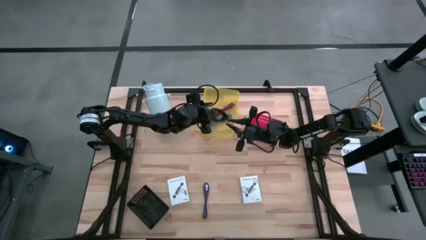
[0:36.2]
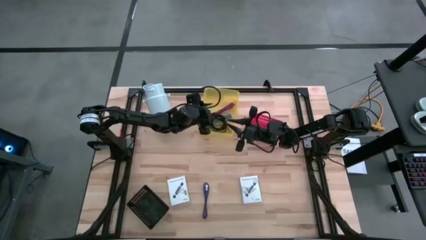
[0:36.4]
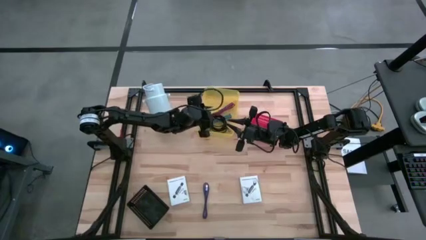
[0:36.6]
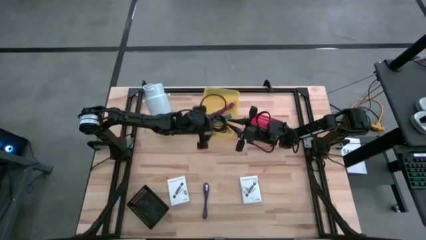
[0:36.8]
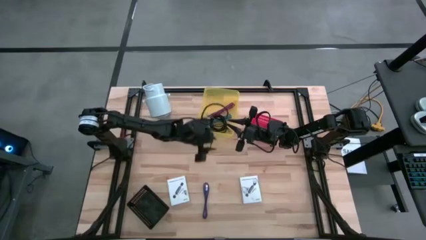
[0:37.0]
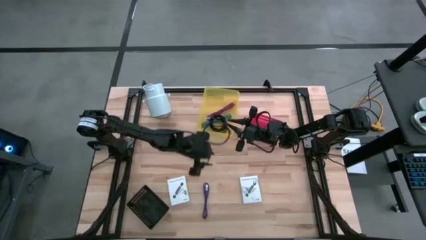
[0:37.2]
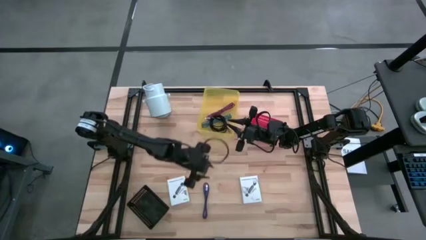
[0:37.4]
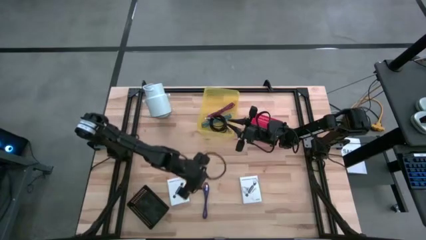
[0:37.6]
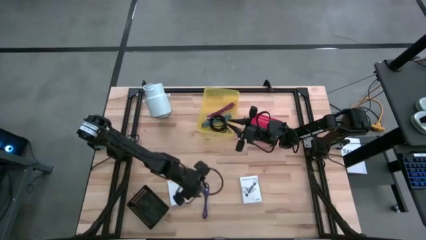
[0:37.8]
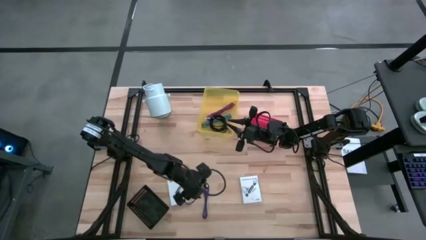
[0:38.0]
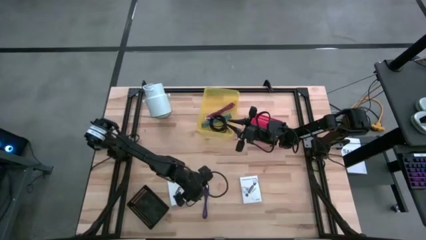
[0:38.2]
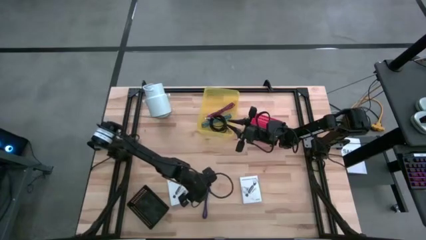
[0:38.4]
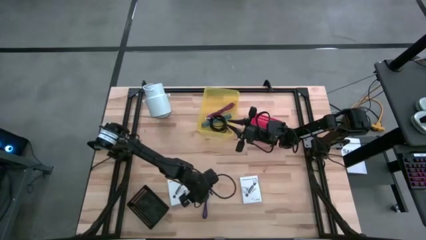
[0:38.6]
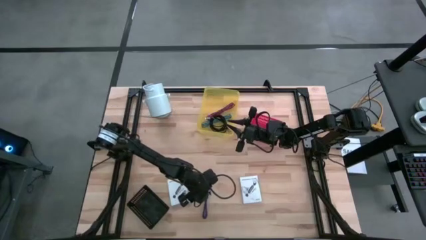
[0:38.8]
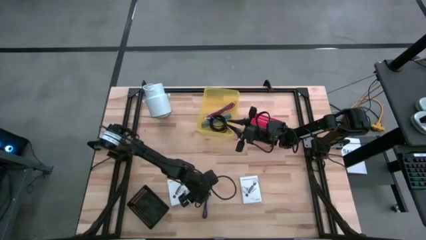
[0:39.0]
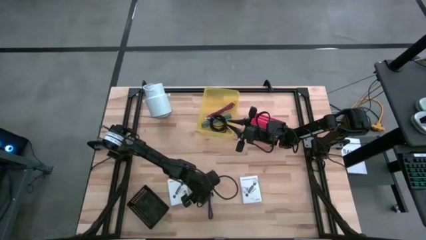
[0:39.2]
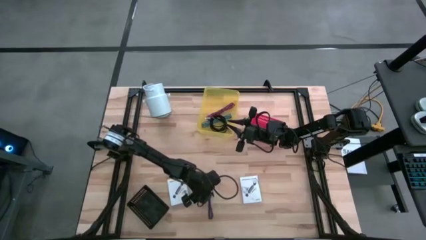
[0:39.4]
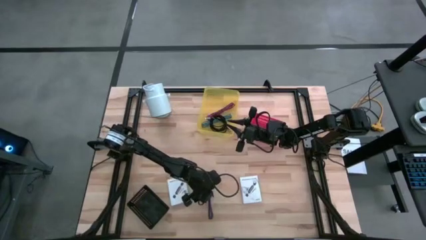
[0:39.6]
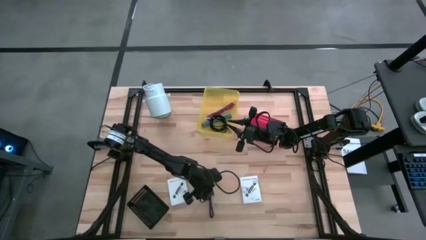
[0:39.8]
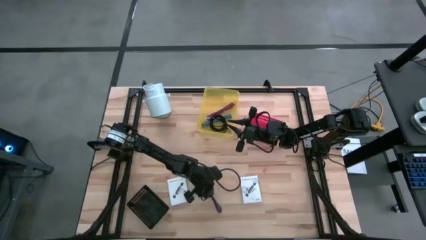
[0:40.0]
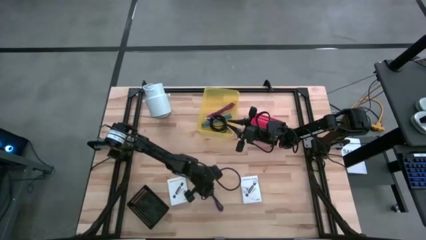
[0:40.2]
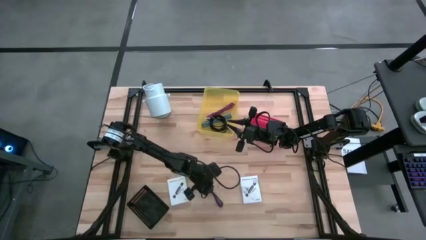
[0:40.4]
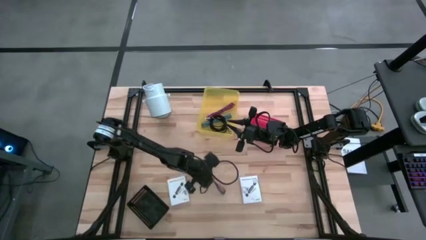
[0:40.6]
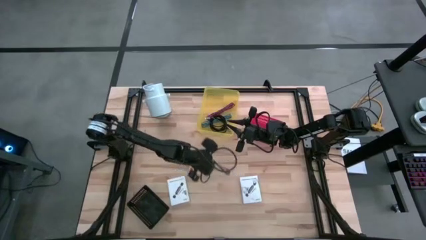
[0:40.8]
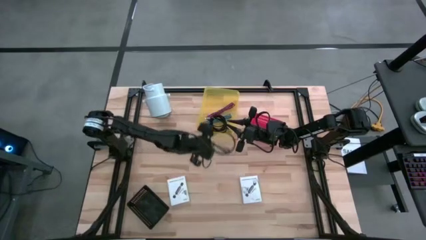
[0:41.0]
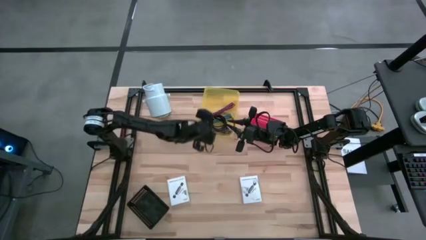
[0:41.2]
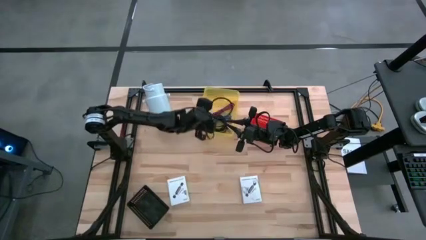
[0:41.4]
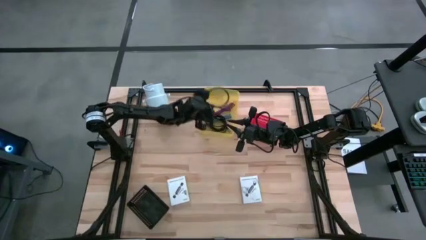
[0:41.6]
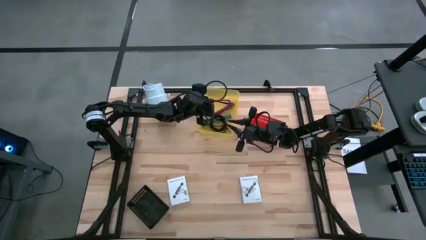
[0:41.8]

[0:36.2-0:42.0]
Task: Pick and place items into bin
Put the purple charger cable into the yellow bin

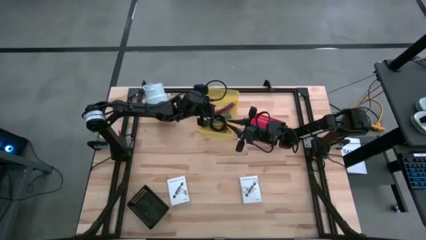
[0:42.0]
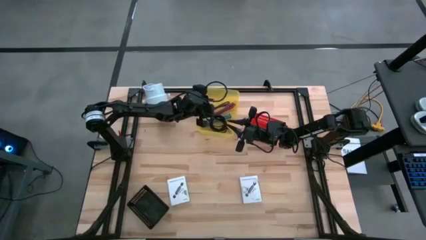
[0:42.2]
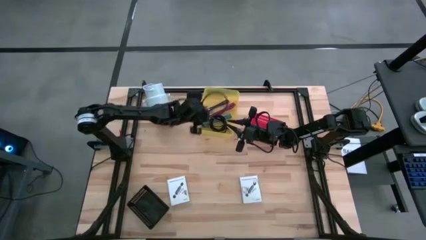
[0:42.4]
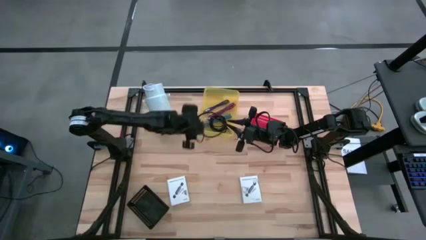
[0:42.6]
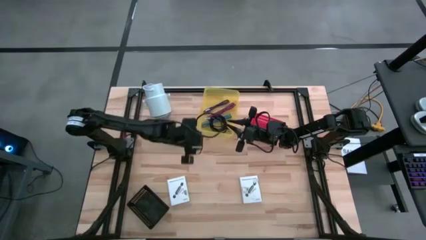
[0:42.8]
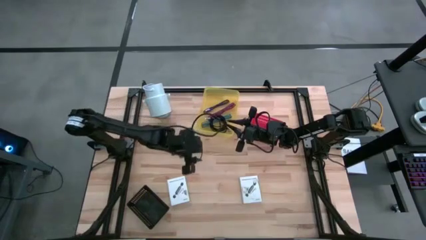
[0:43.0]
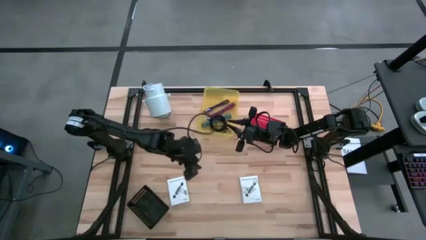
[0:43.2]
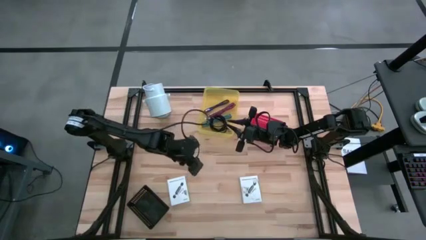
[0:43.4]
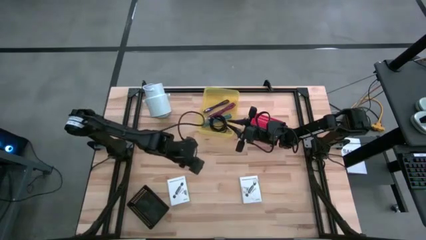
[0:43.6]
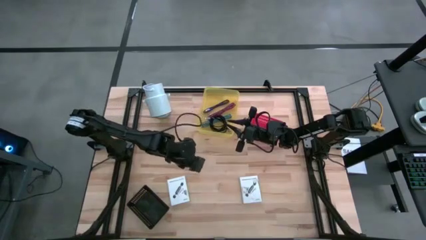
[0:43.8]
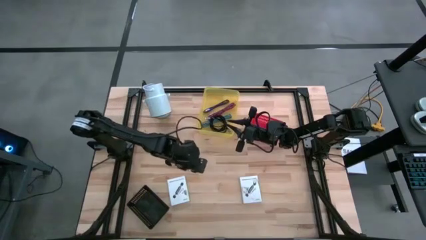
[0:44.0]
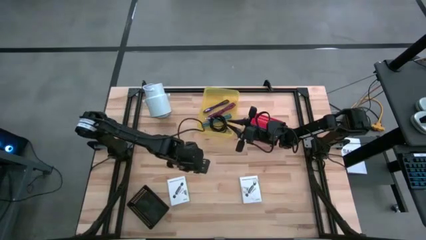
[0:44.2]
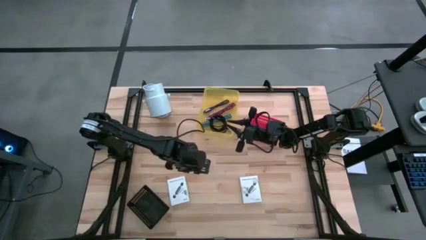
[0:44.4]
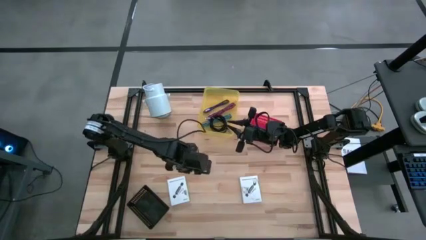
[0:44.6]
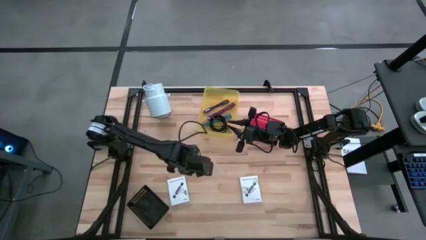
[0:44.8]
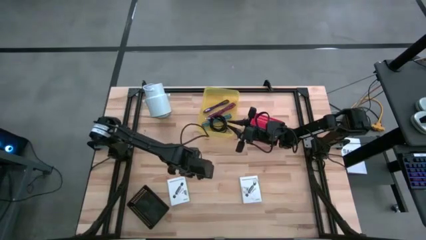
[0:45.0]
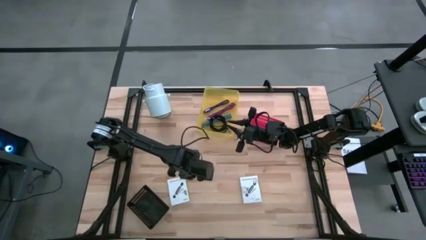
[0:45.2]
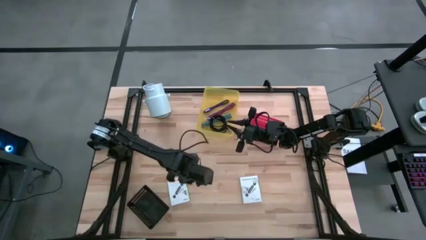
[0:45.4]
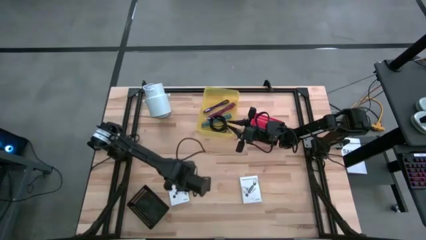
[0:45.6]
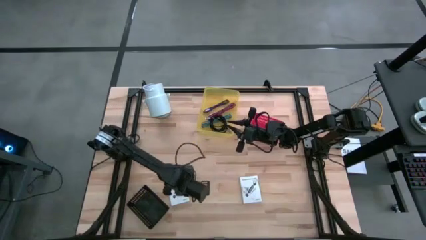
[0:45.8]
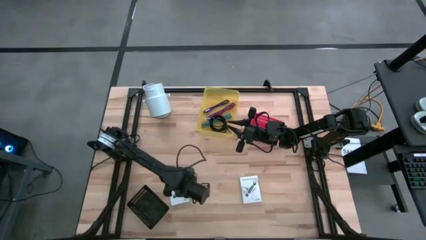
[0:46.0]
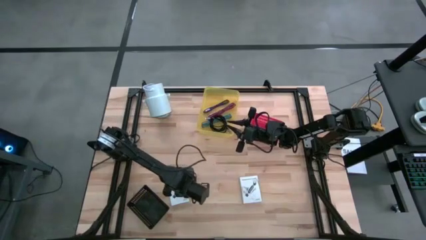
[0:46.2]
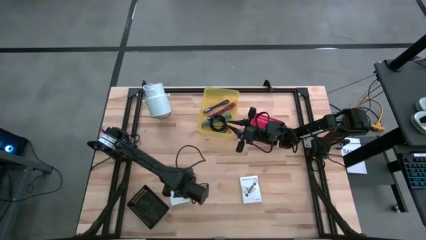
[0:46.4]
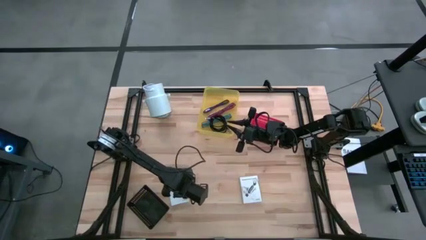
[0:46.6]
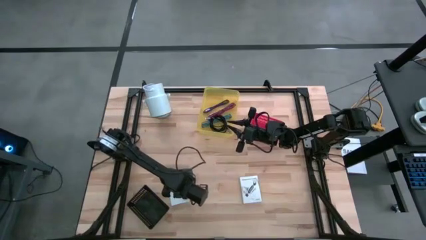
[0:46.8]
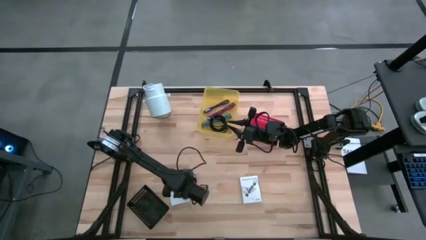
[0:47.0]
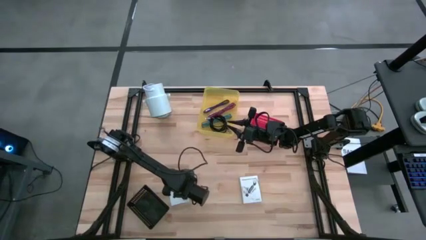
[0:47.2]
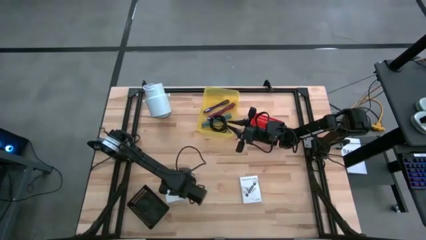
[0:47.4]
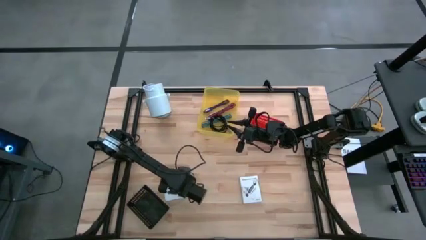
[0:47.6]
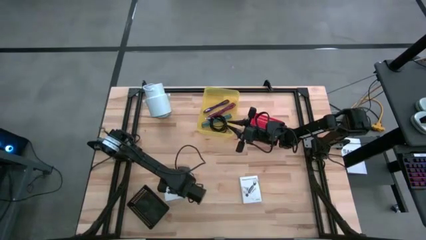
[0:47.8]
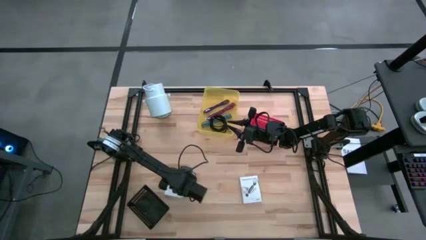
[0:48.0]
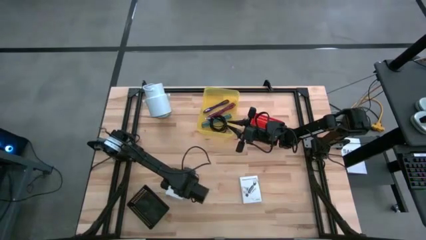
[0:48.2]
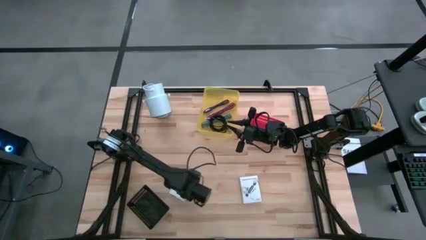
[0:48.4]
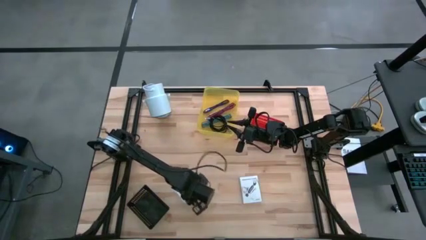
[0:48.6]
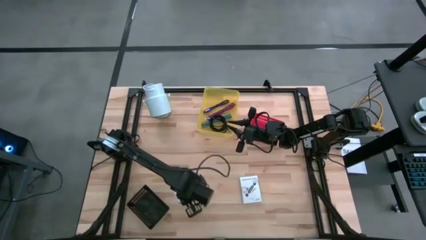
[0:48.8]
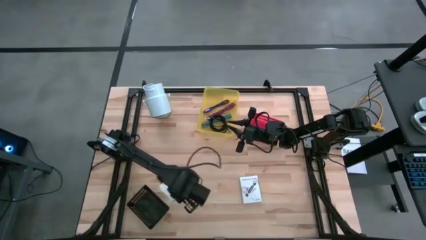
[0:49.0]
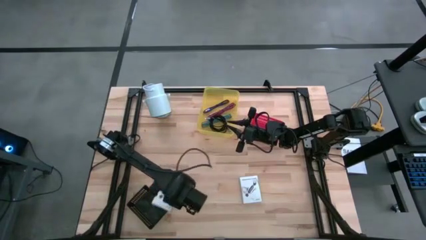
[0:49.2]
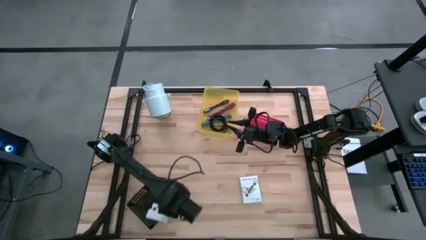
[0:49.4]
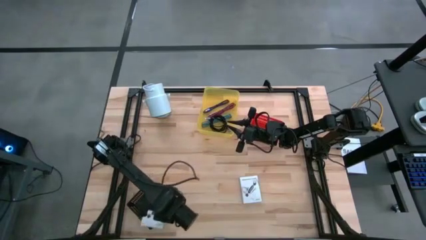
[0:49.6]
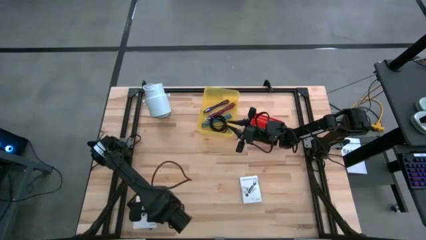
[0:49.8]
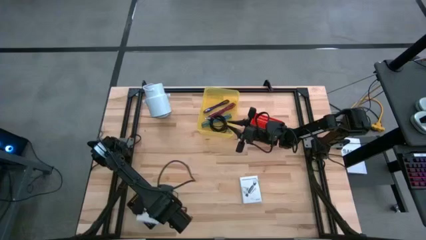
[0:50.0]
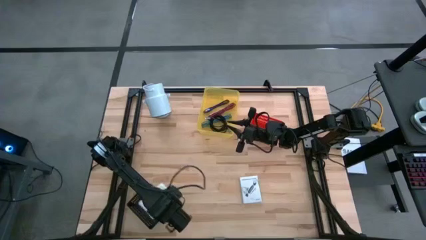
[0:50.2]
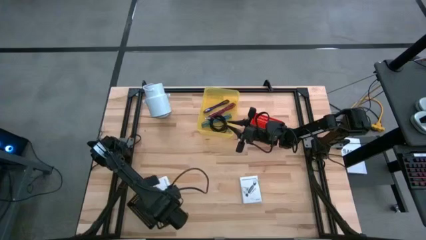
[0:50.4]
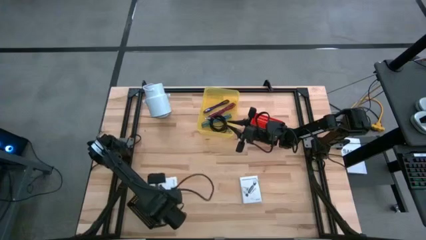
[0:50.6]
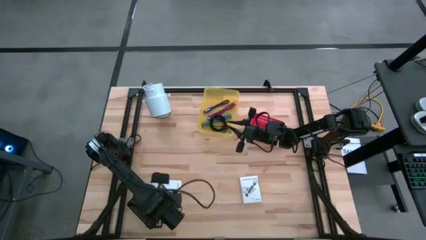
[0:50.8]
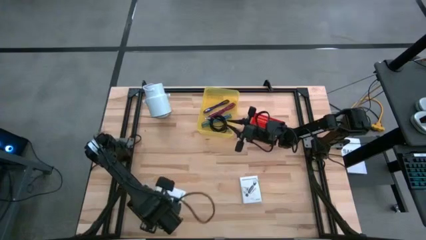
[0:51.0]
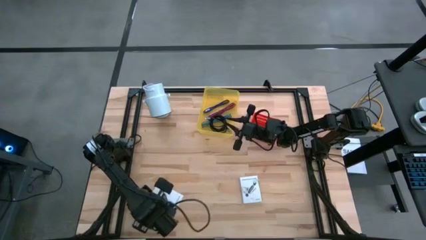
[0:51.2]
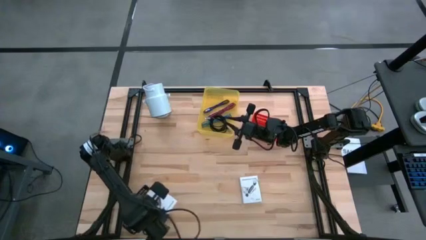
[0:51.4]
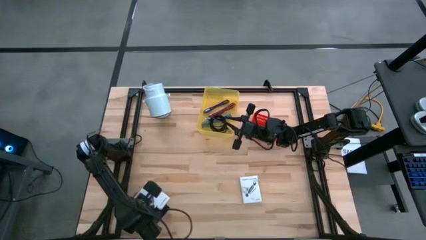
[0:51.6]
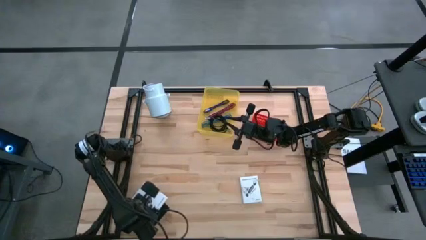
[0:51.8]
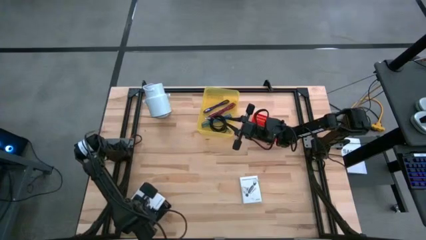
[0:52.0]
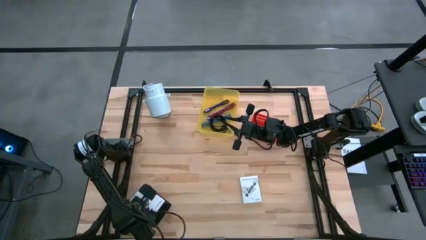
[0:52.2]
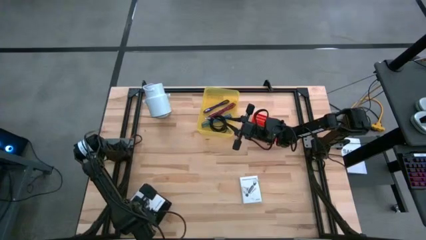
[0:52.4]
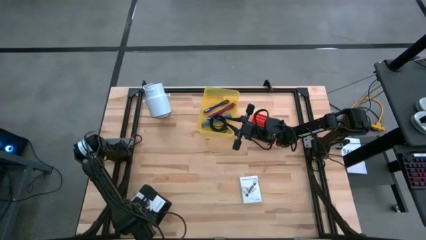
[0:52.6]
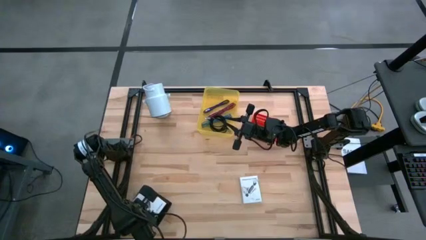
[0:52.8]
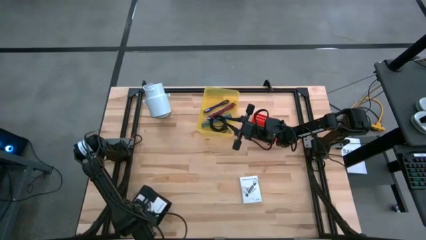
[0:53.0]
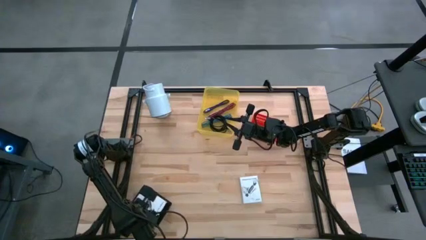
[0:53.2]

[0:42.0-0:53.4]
Put the left white card reader box into the black bin
